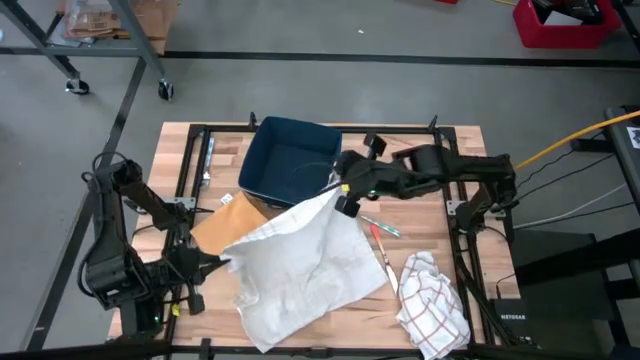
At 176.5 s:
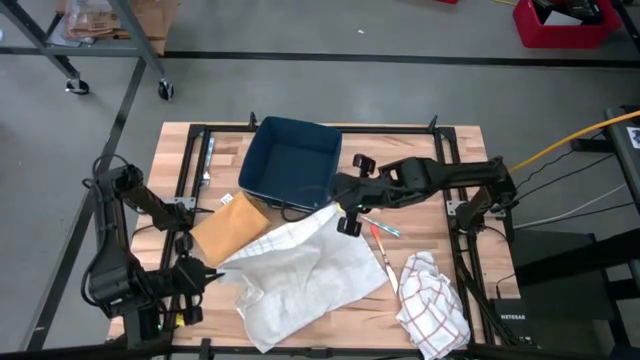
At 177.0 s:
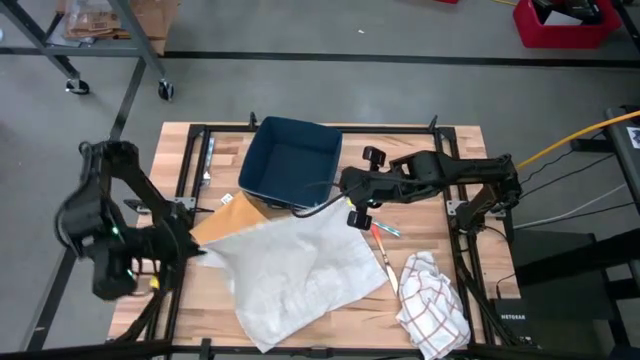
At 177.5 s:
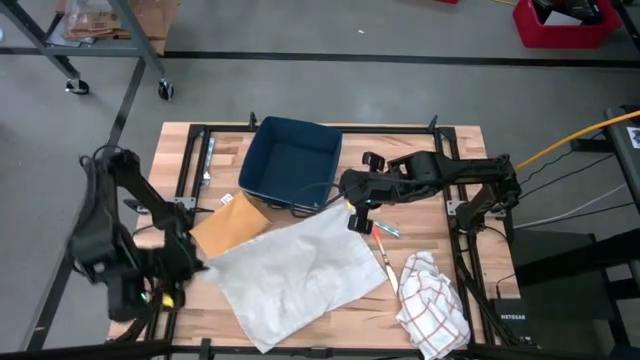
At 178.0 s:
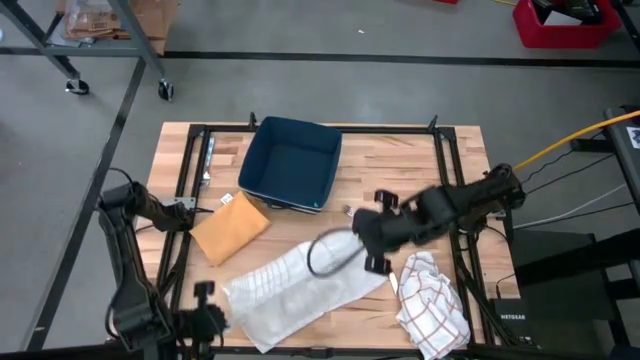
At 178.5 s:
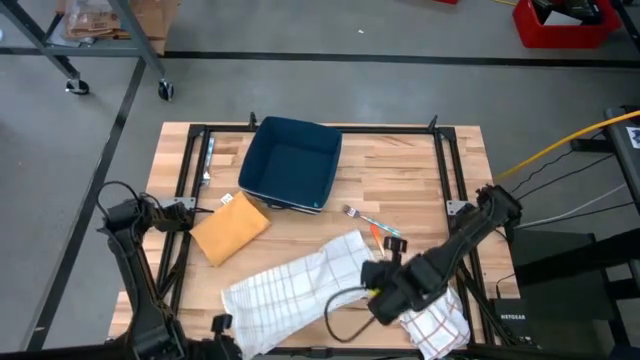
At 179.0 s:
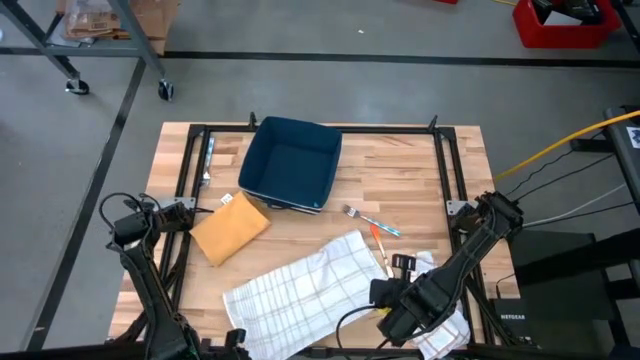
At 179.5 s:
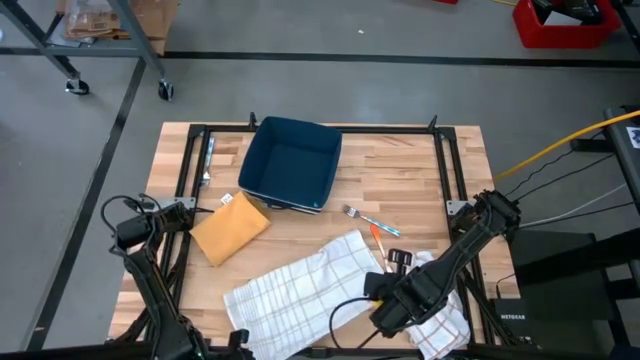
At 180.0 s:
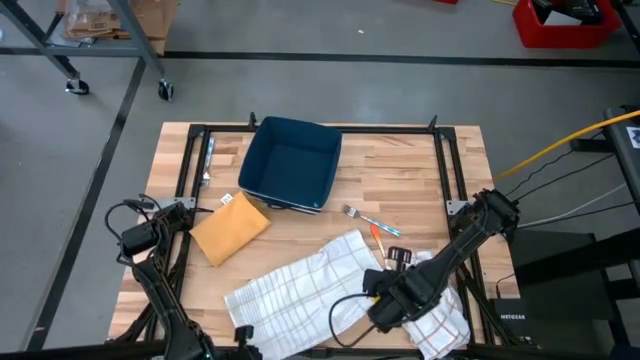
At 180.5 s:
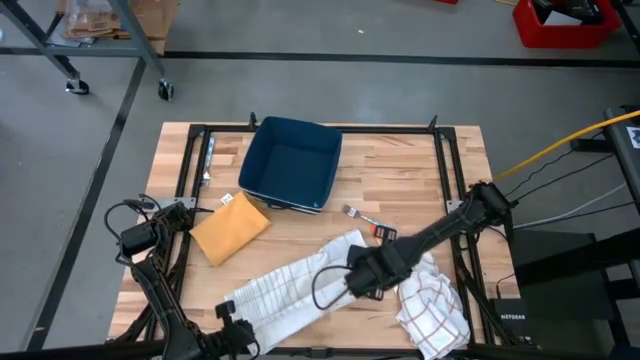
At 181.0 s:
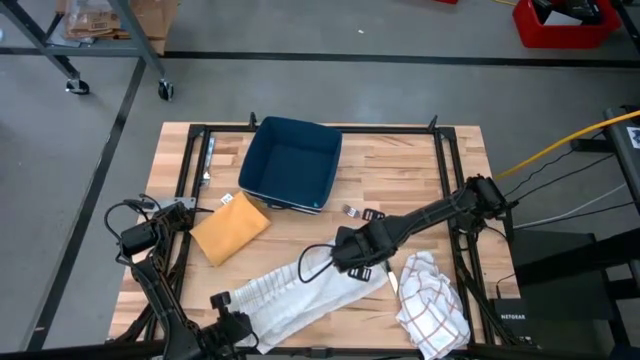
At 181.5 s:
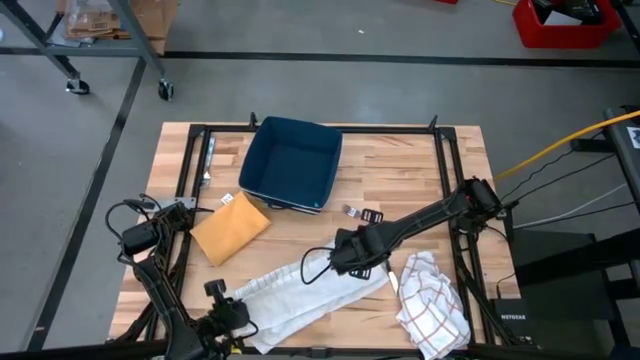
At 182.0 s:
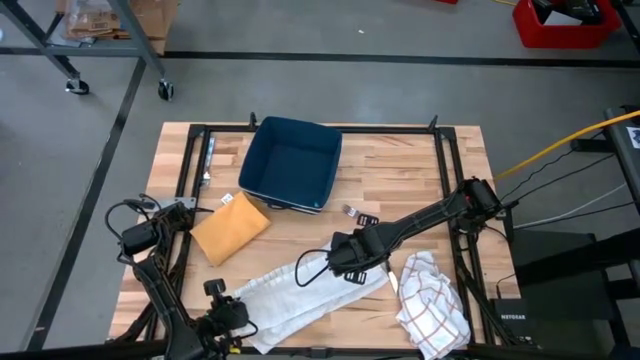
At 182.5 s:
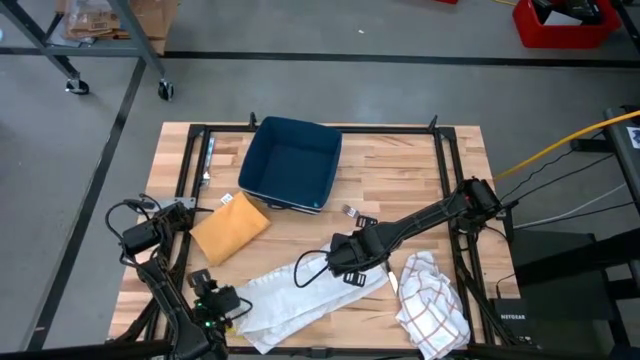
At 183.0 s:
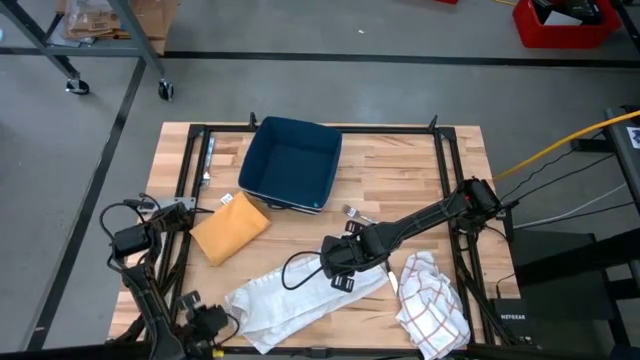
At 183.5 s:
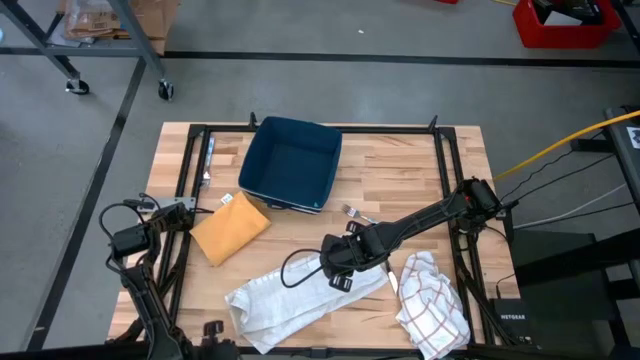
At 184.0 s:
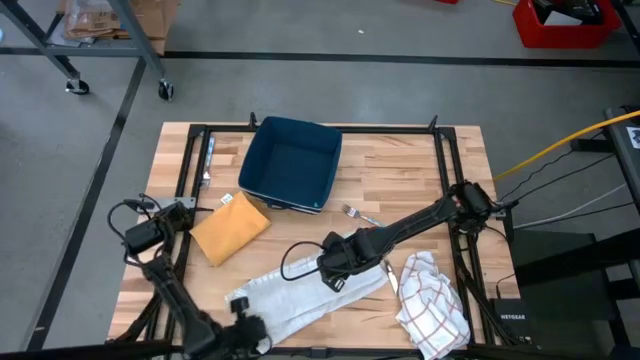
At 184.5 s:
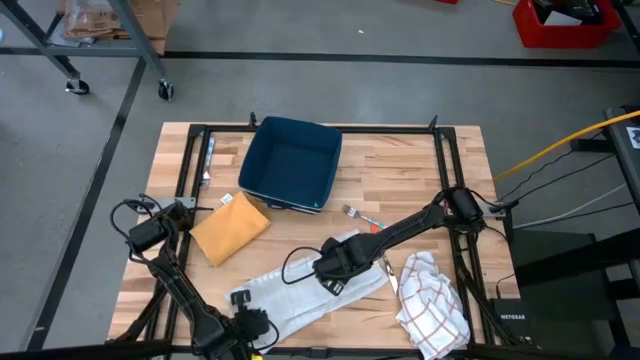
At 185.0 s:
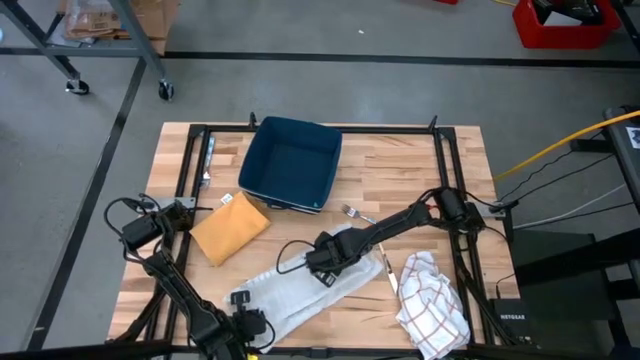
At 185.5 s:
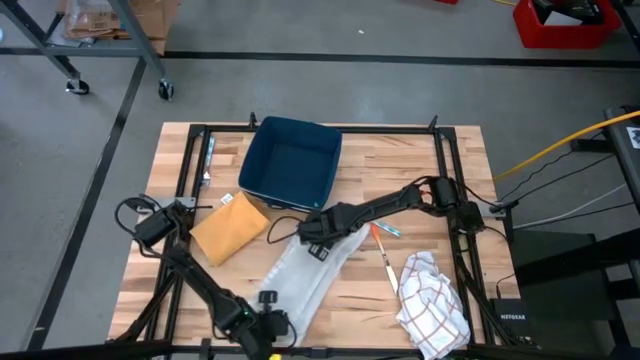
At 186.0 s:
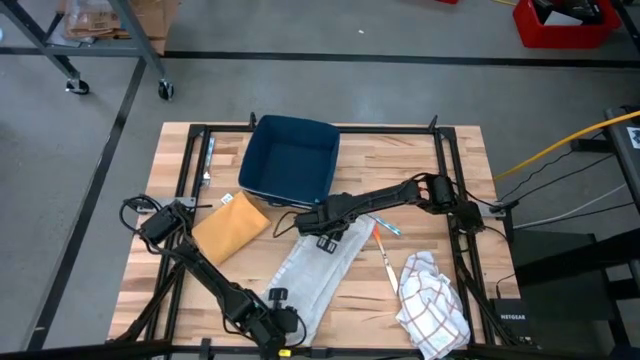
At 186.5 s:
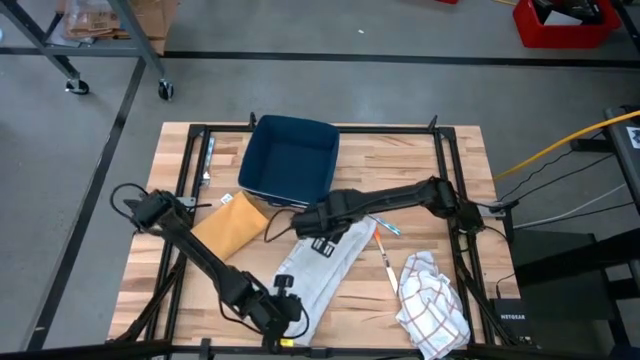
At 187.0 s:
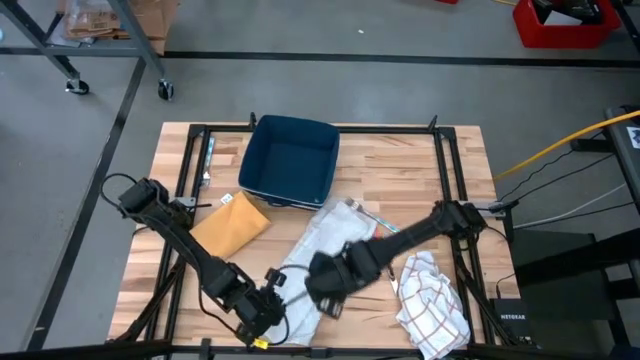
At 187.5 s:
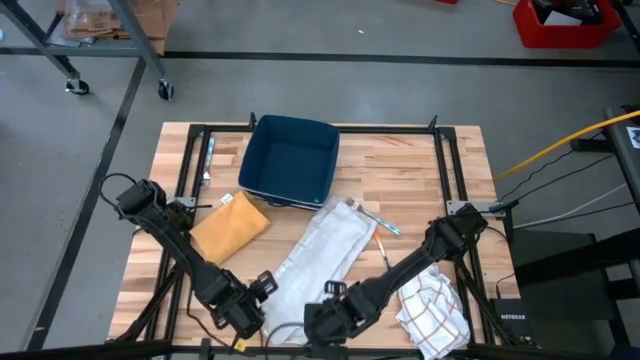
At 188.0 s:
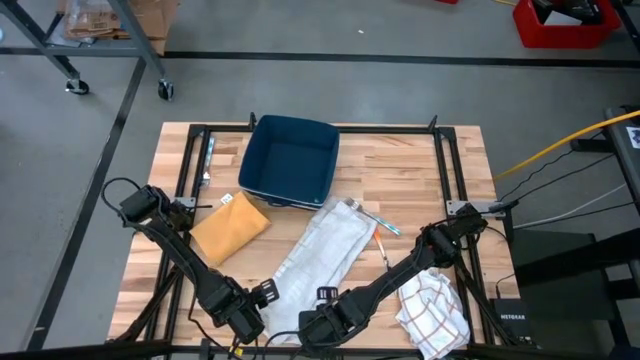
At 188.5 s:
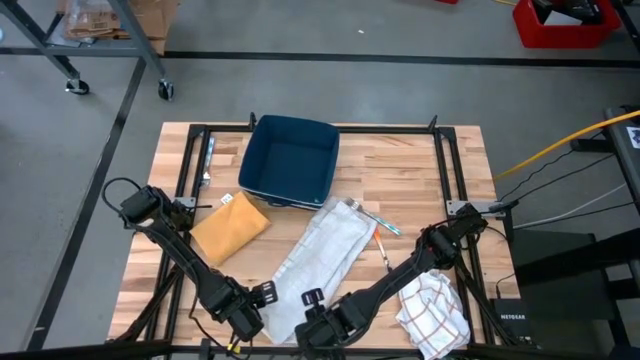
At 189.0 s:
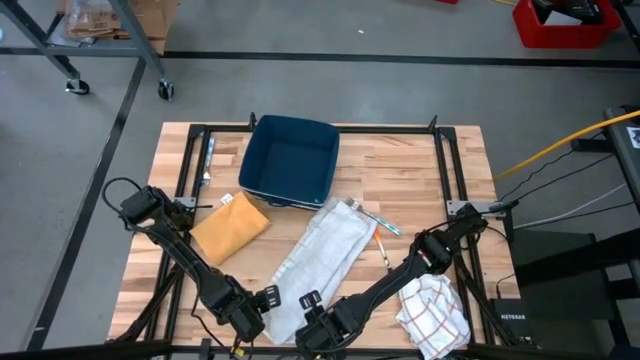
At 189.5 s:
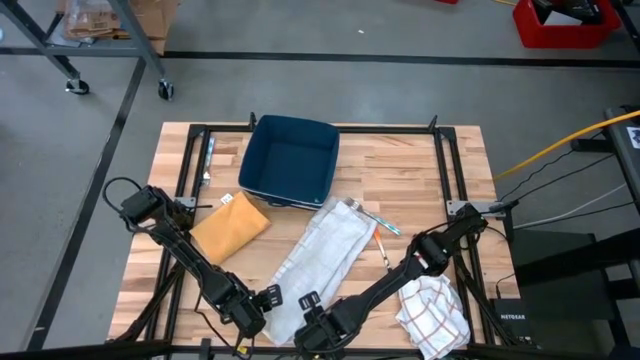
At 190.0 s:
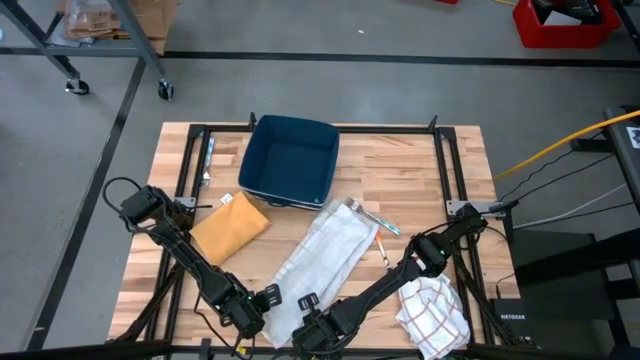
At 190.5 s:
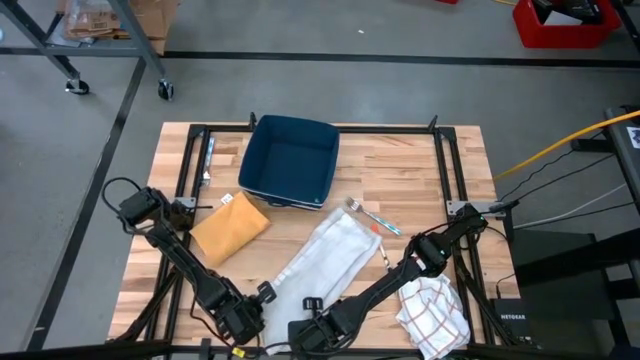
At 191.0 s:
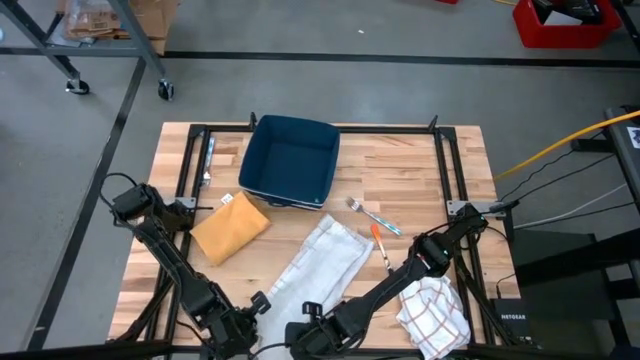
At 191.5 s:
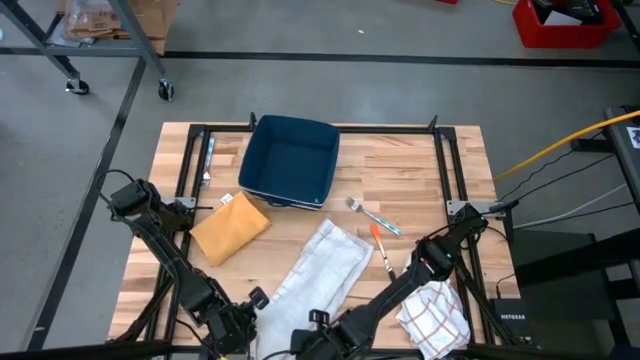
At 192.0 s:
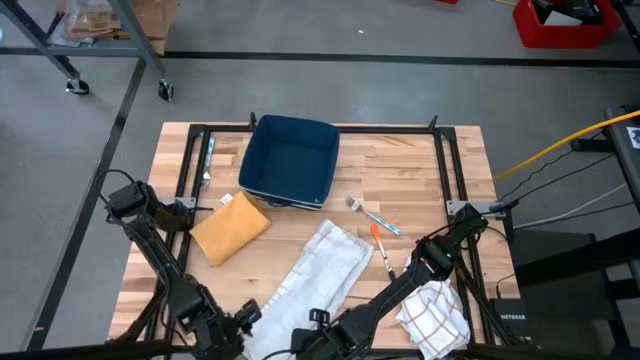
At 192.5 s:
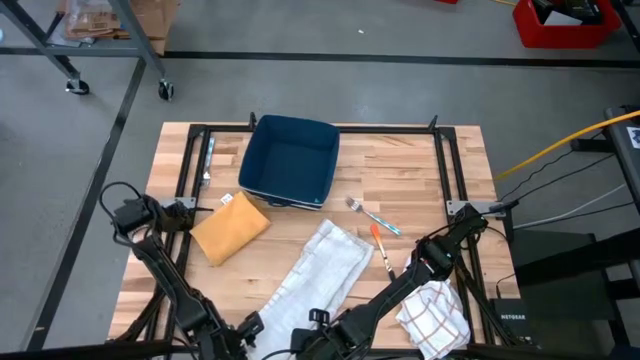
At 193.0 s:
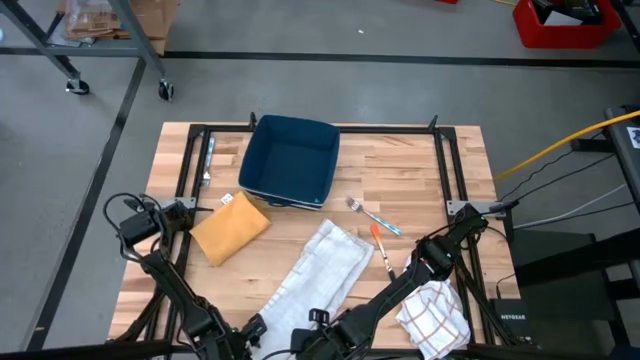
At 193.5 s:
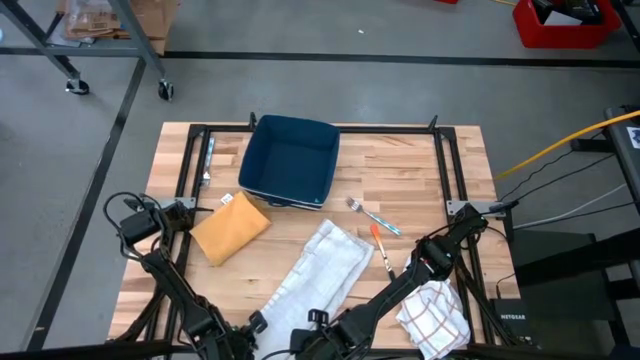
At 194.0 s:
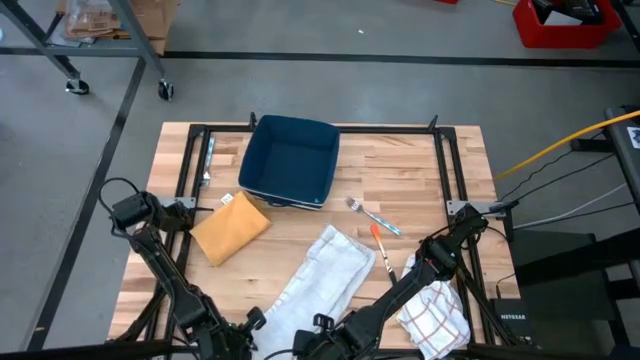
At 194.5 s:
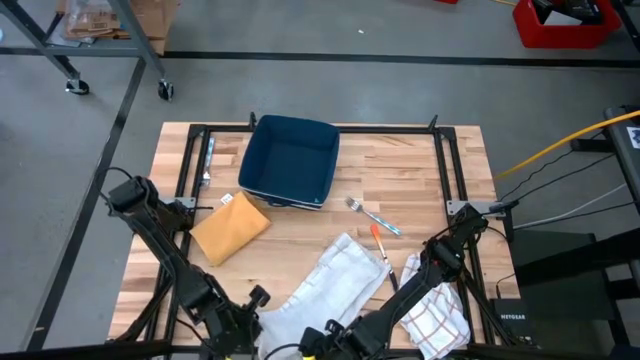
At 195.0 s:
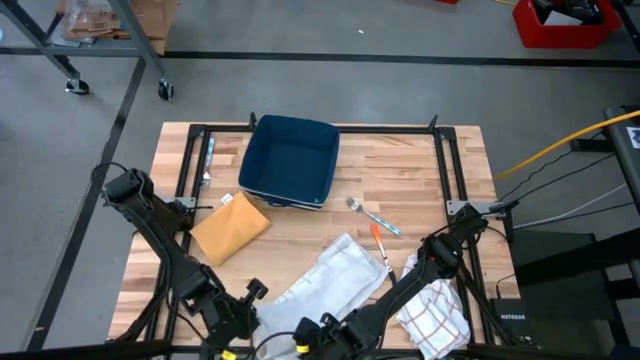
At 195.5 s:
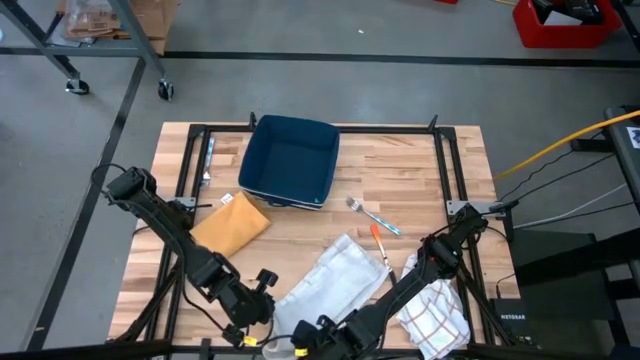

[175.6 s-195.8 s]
Task: Fold towel
Fold the top white patterned towel

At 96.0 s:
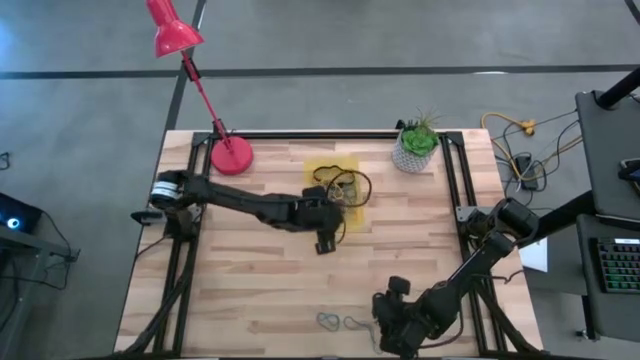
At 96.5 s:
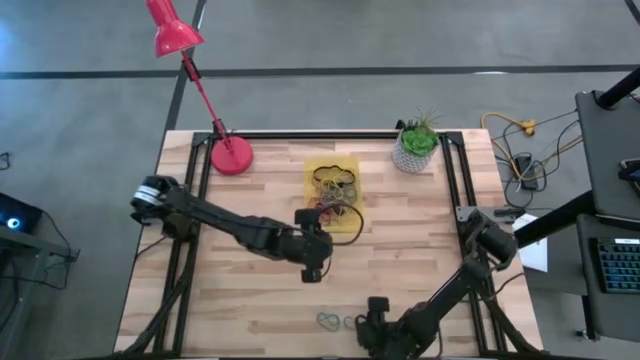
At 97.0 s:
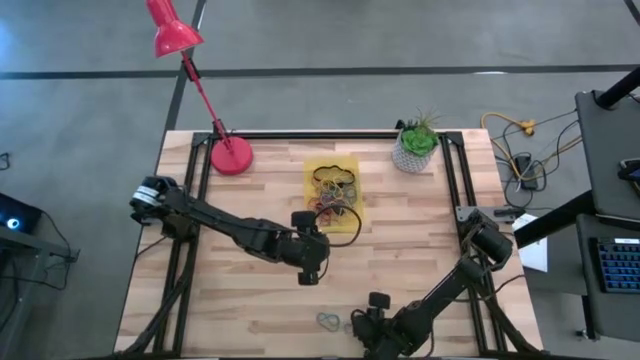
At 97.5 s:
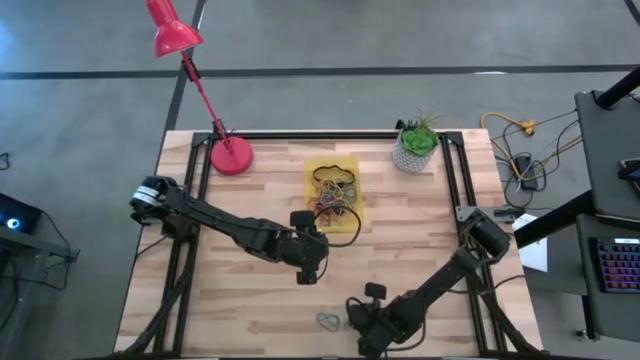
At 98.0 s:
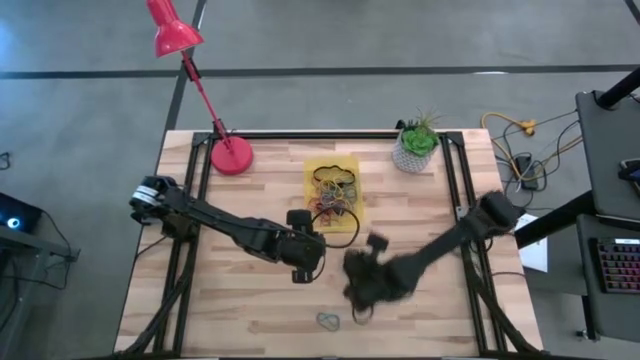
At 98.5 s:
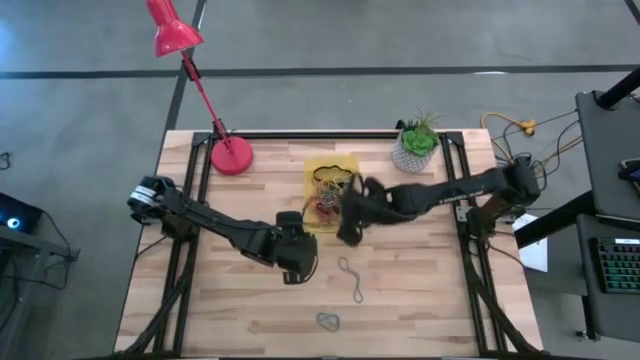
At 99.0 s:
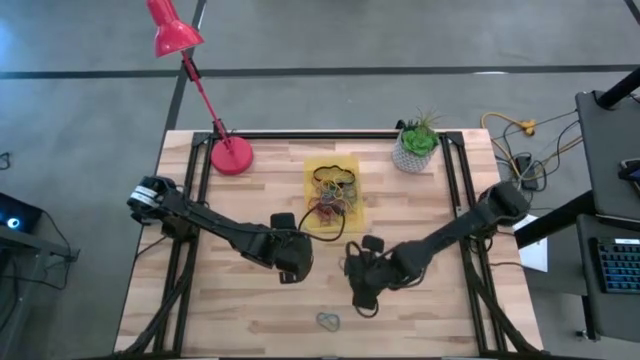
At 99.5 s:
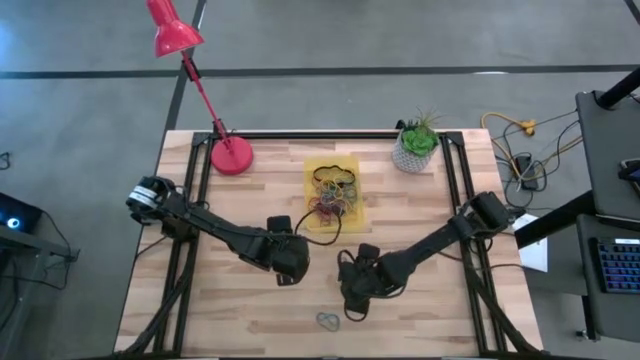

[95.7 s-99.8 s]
Task: Pick and place rubber bands into bin
Put the blue rubber band into the yellow bin
